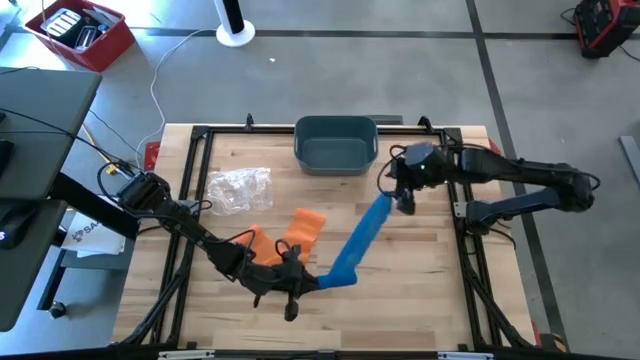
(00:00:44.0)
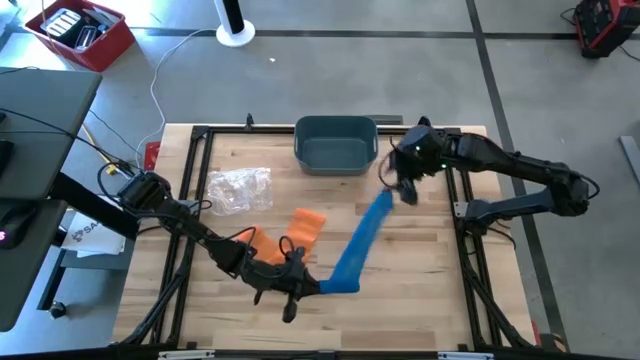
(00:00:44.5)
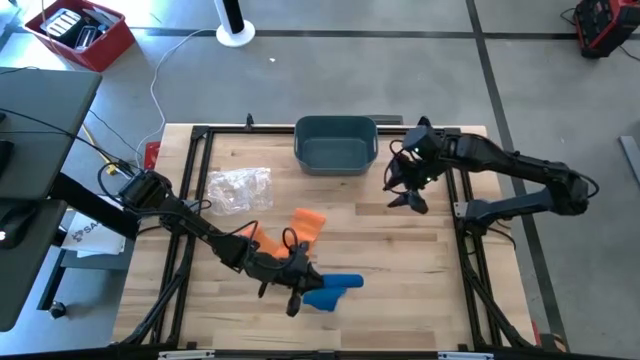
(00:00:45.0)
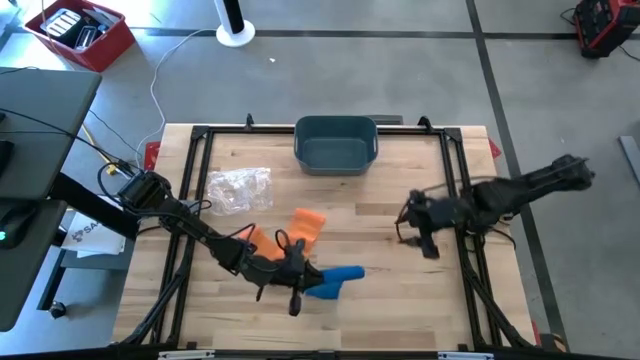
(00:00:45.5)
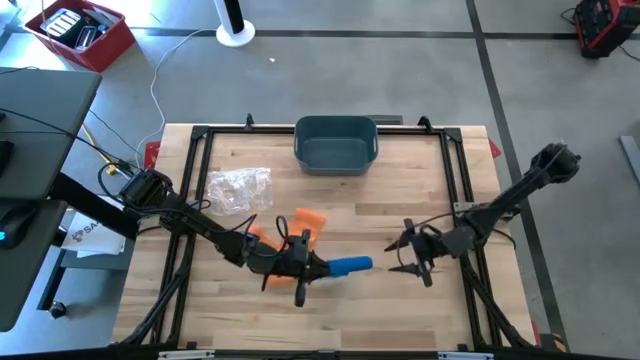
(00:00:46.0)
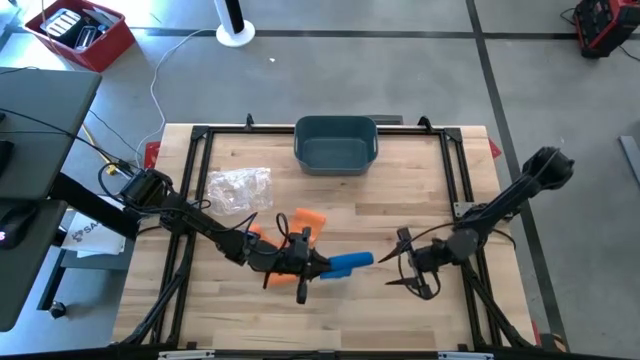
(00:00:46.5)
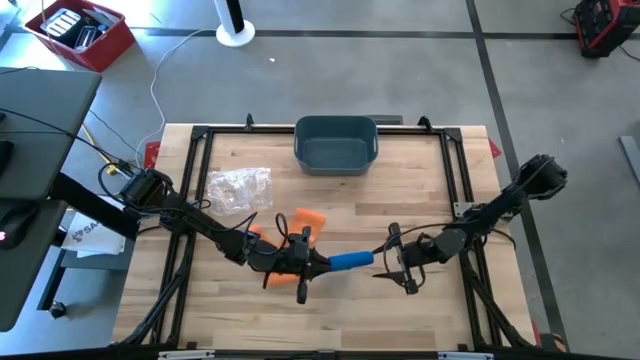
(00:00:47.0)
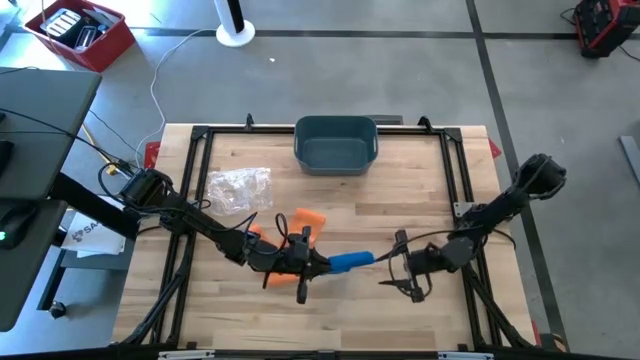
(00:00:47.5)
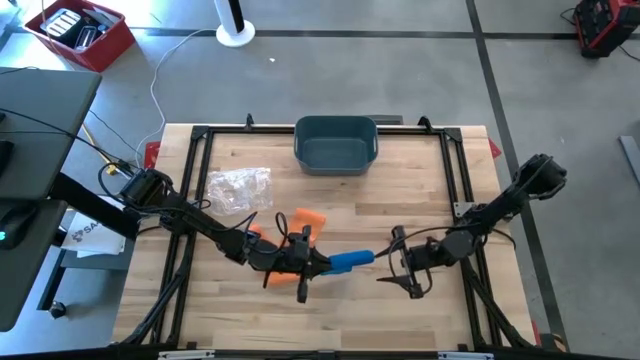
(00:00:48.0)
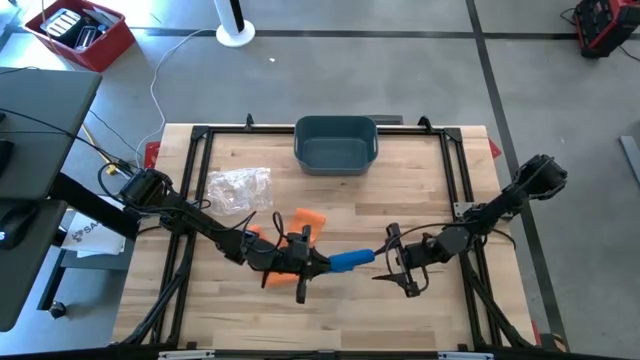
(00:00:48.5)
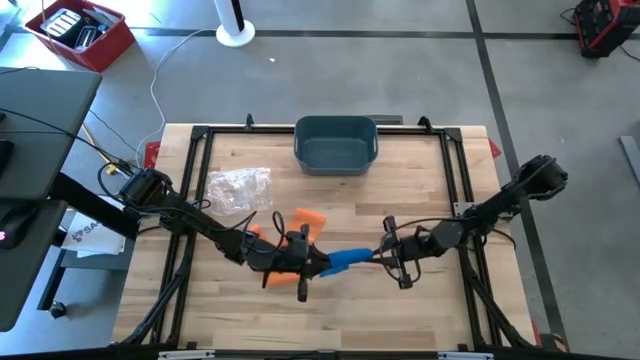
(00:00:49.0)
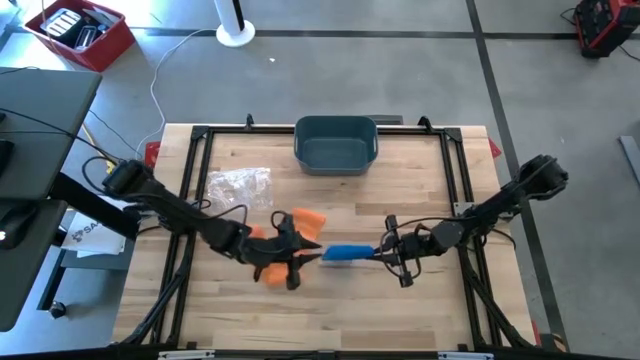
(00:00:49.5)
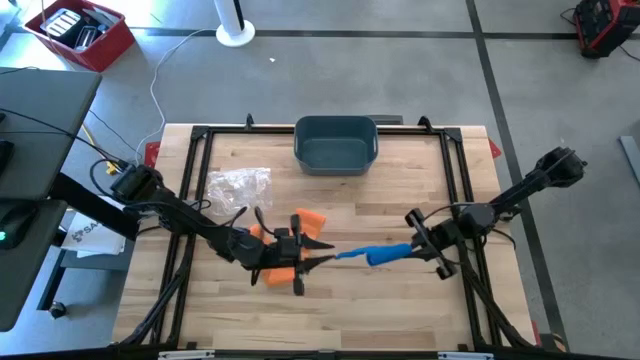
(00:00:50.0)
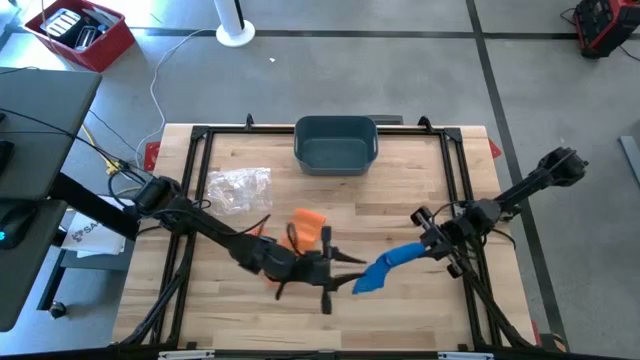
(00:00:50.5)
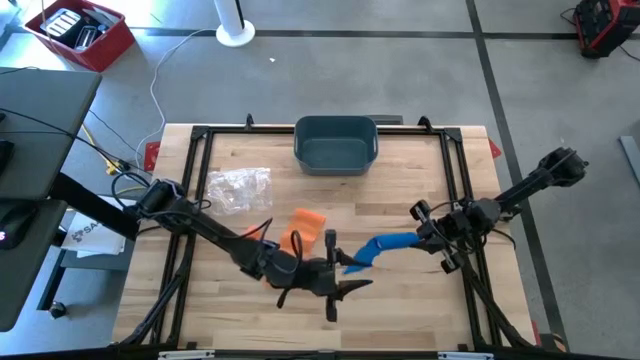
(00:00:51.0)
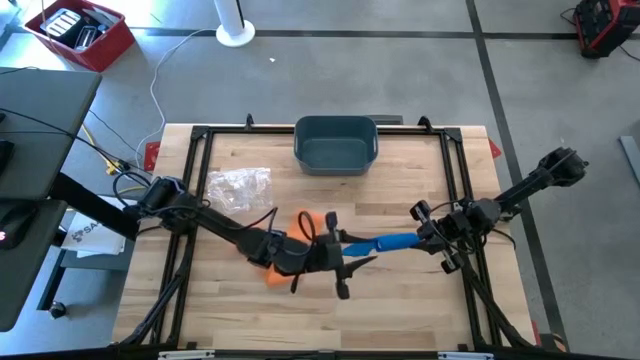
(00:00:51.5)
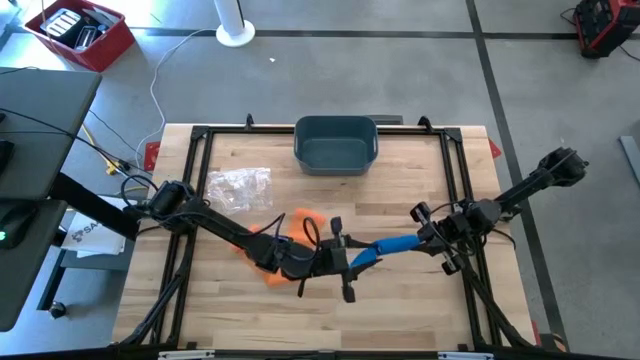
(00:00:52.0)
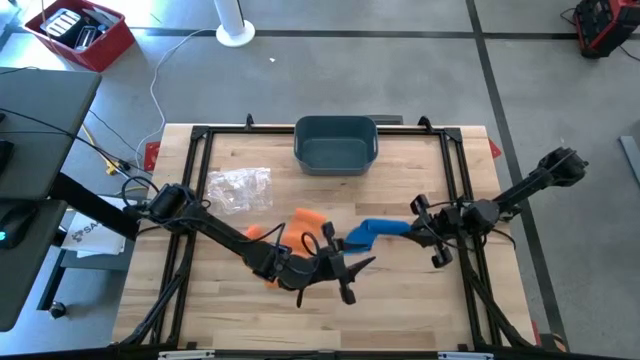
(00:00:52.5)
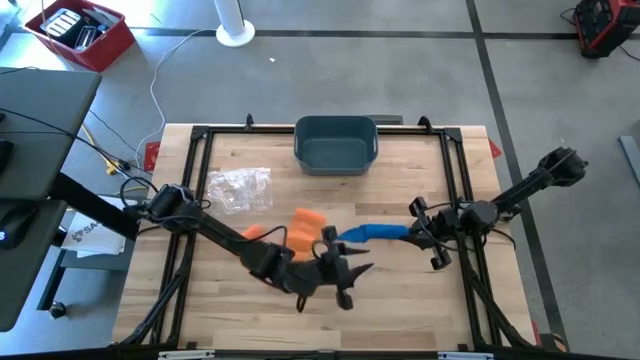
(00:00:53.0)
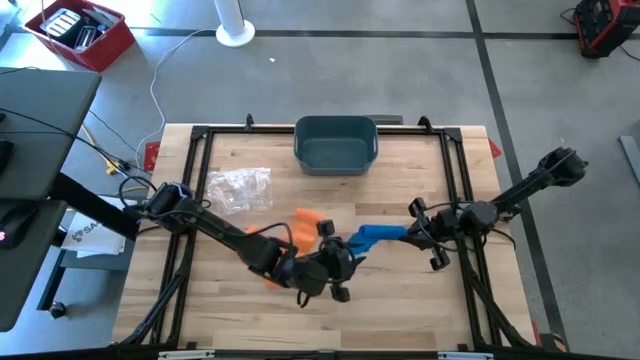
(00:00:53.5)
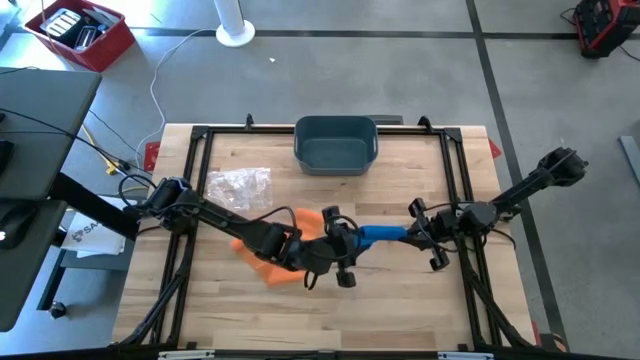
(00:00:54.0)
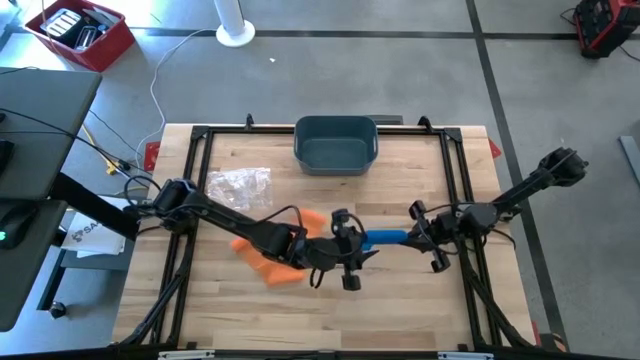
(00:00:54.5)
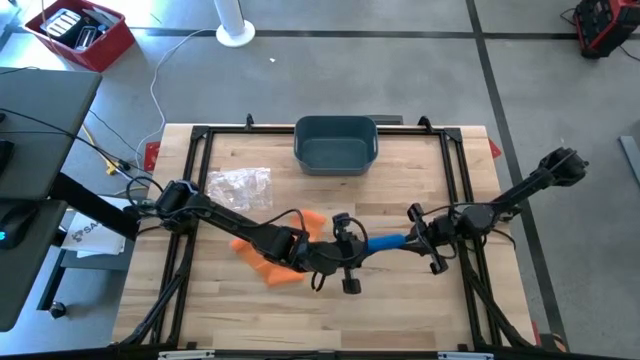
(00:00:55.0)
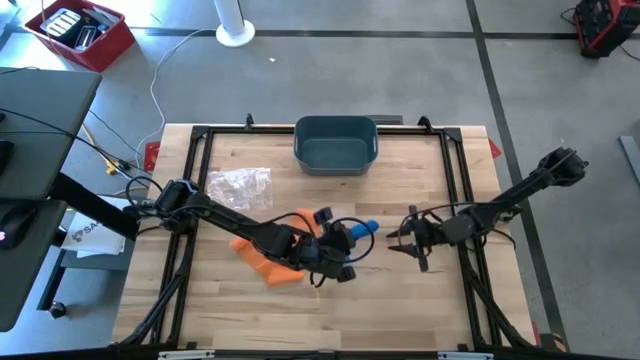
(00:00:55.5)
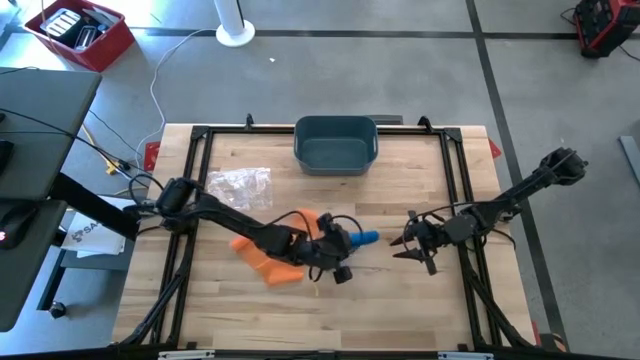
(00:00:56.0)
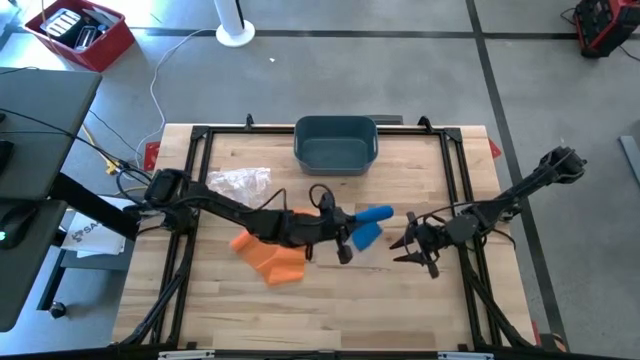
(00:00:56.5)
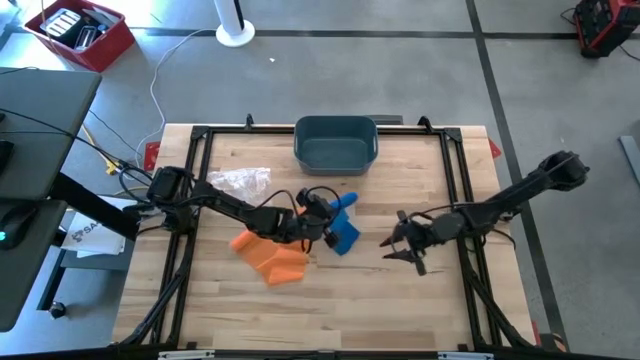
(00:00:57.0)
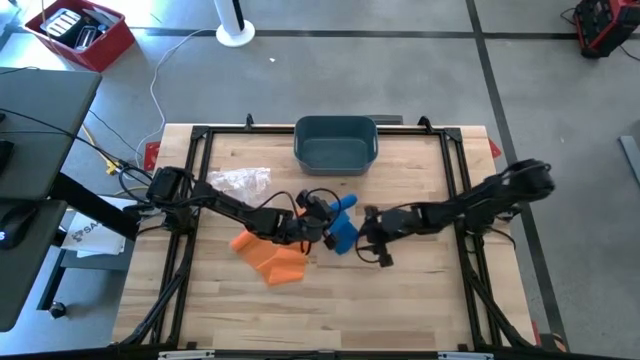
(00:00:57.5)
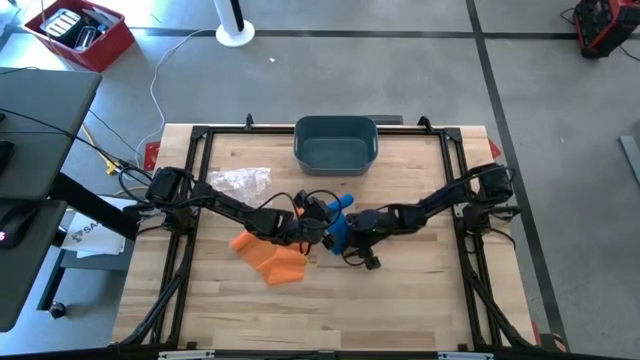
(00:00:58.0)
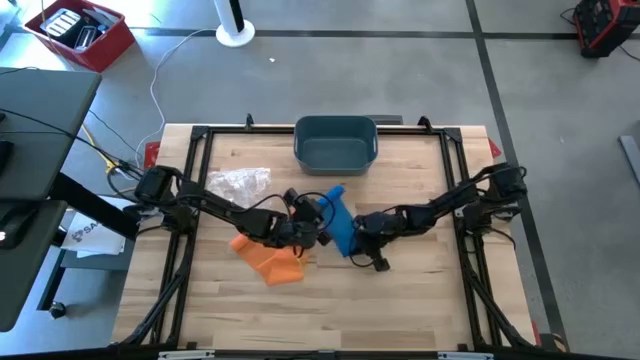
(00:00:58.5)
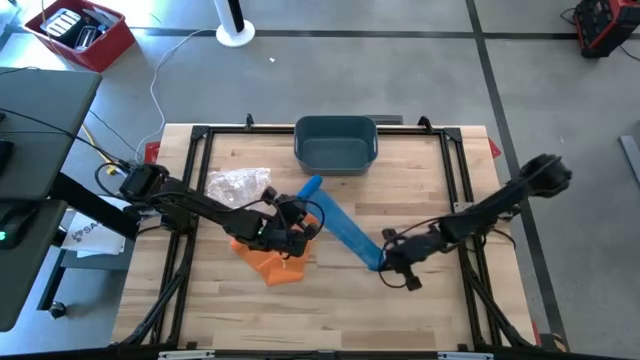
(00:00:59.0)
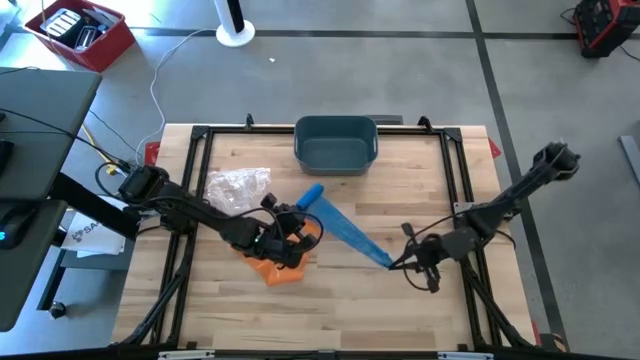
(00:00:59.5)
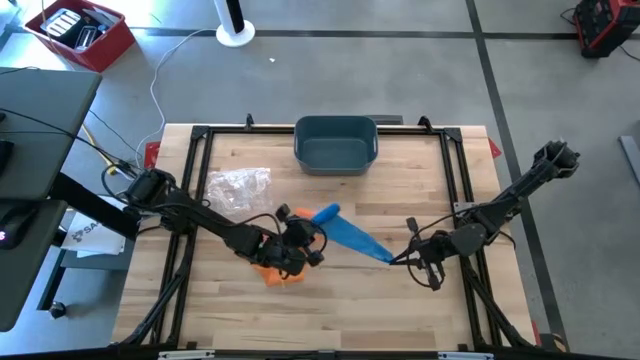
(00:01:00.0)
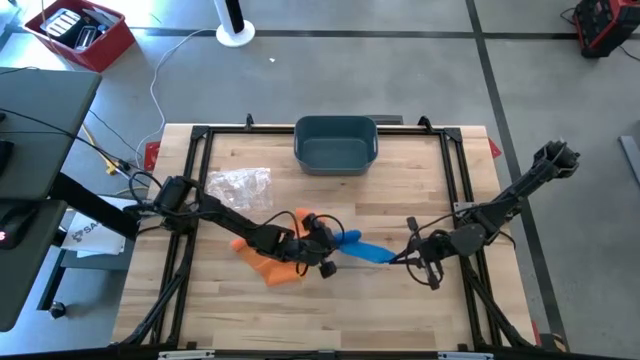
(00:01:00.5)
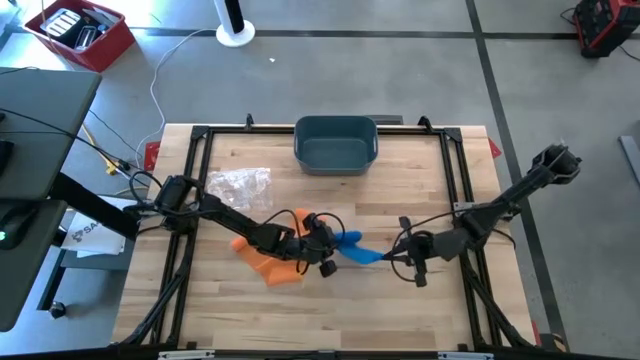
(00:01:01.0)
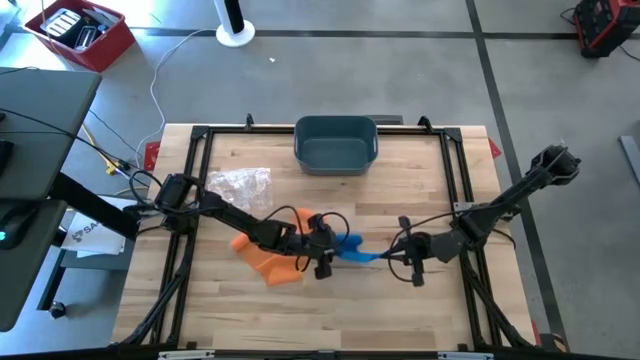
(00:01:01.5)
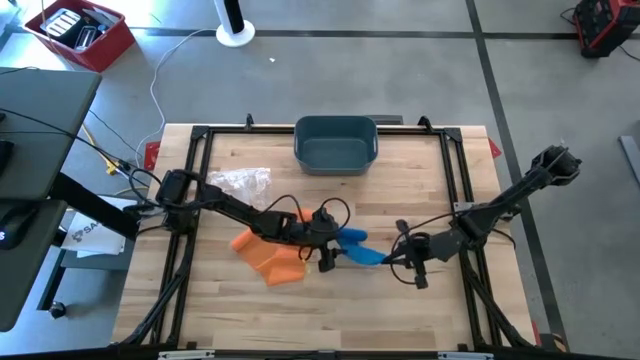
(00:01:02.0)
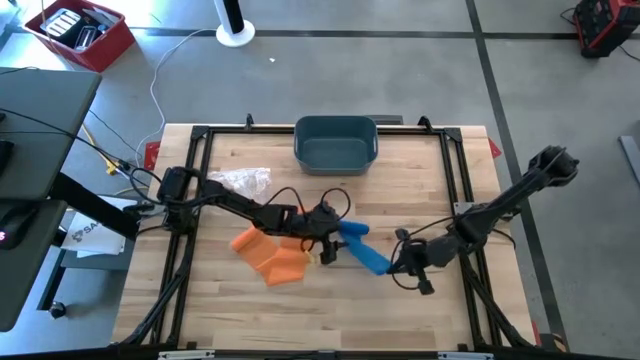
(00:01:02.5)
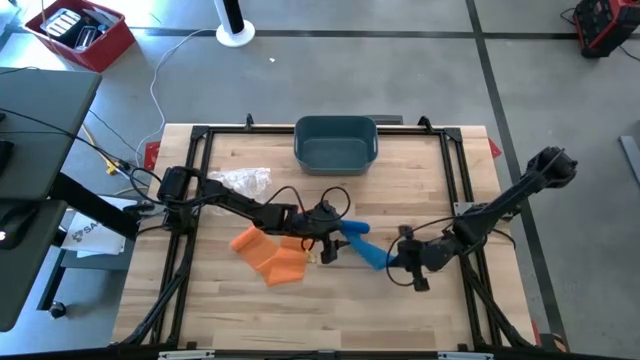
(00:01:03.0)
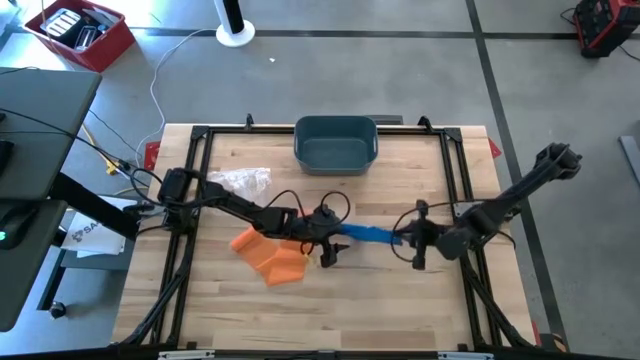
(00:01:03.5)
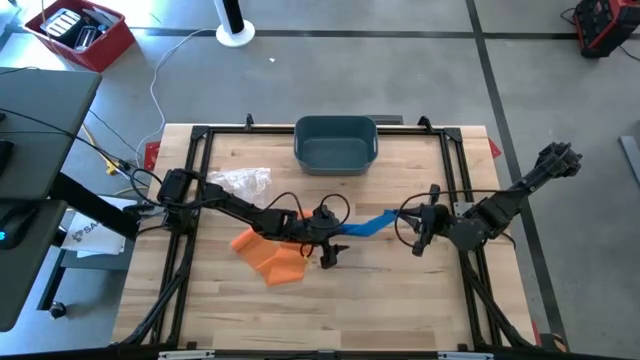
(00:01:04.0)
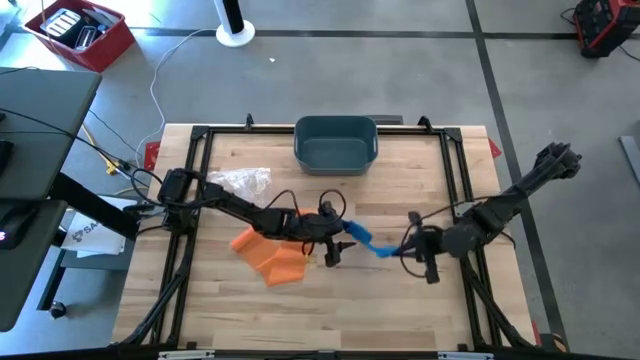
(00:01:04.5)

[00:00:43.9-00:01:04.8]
Task: Roll bandage
Roll the blue bandage
